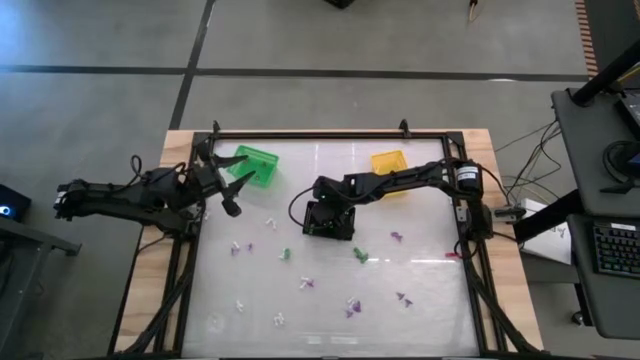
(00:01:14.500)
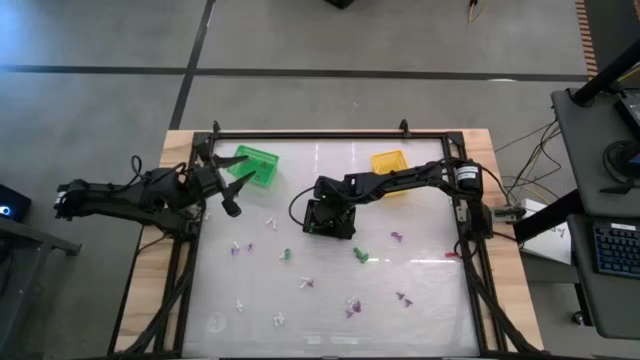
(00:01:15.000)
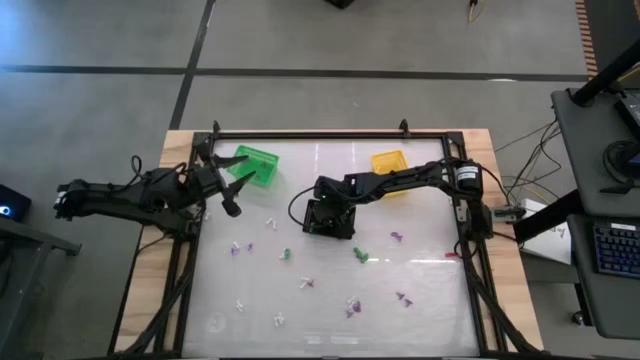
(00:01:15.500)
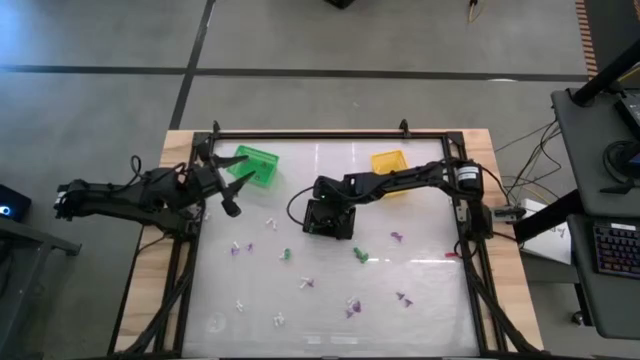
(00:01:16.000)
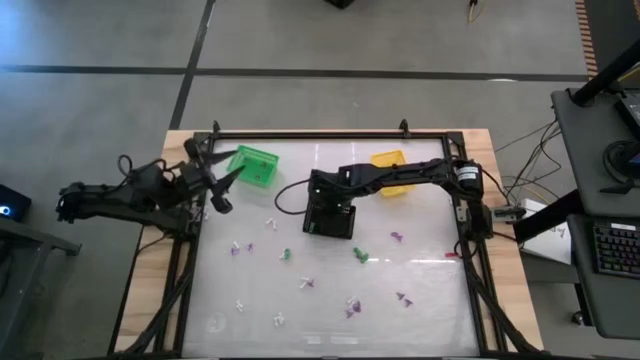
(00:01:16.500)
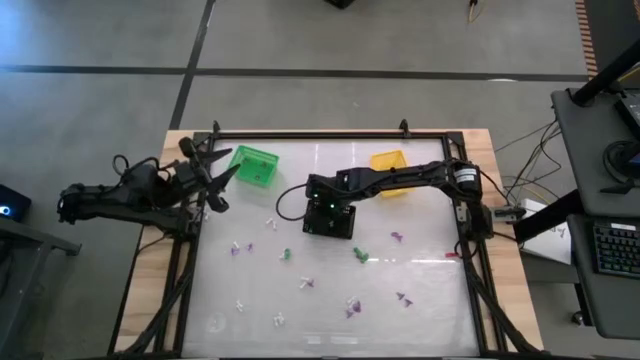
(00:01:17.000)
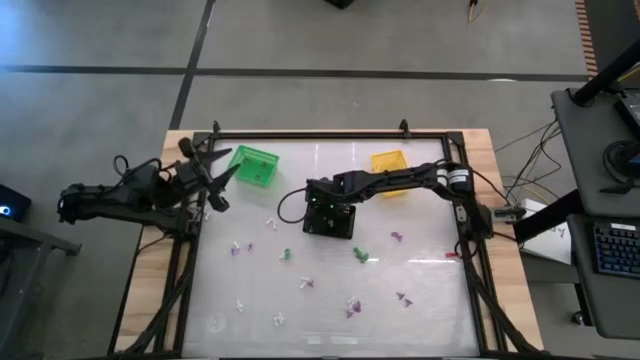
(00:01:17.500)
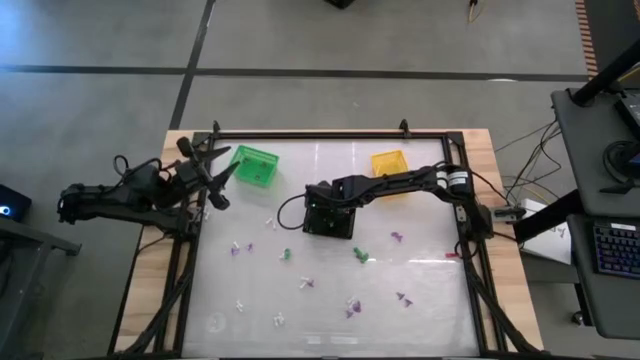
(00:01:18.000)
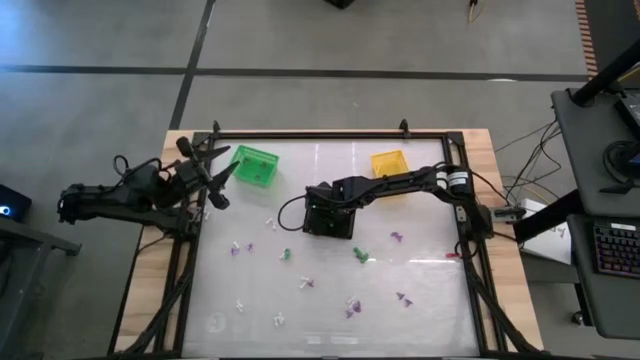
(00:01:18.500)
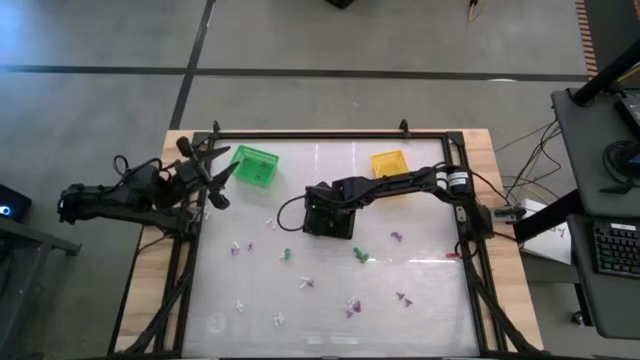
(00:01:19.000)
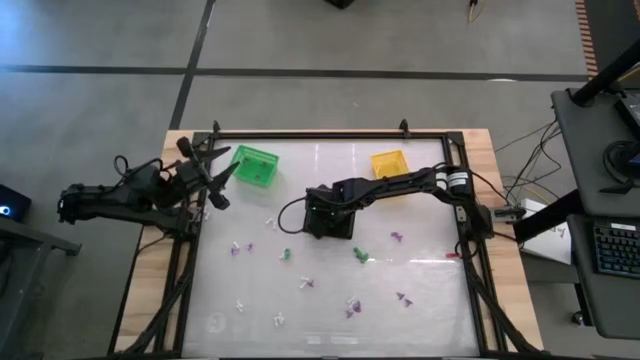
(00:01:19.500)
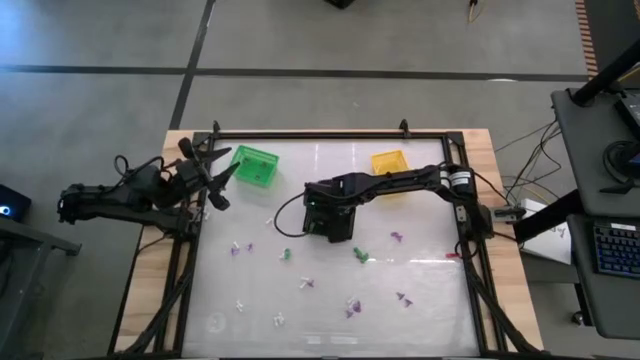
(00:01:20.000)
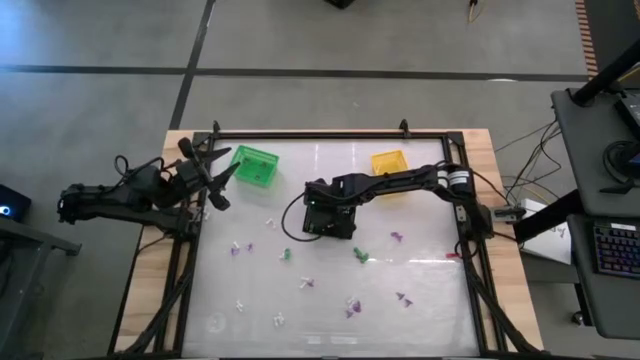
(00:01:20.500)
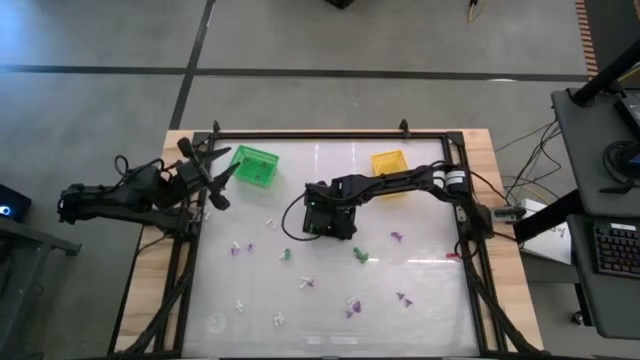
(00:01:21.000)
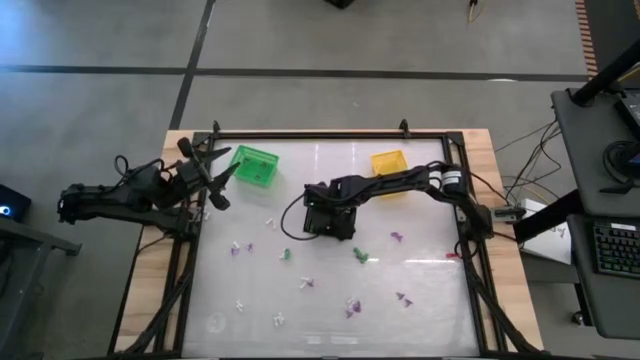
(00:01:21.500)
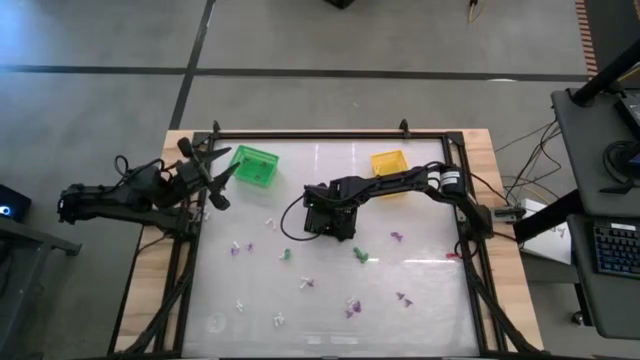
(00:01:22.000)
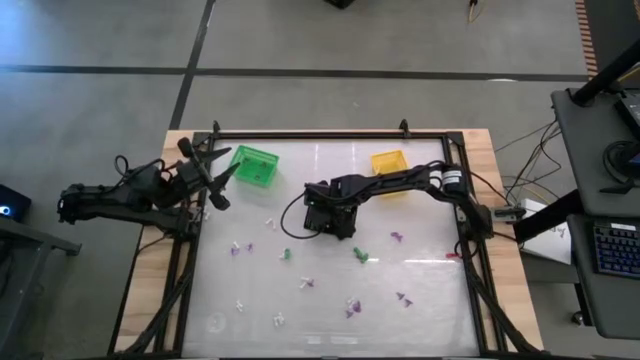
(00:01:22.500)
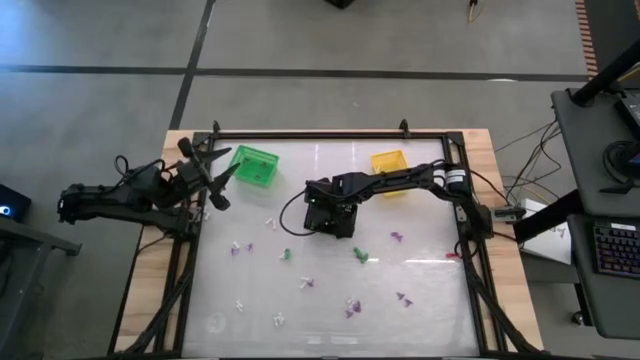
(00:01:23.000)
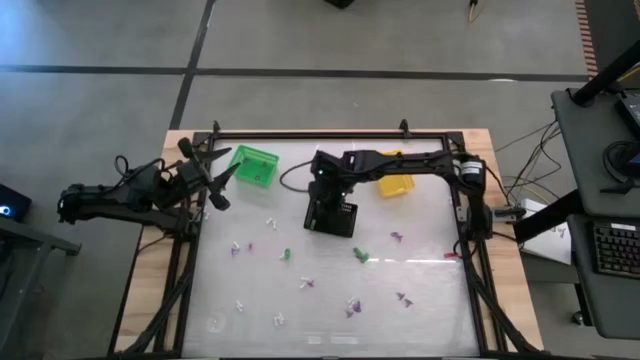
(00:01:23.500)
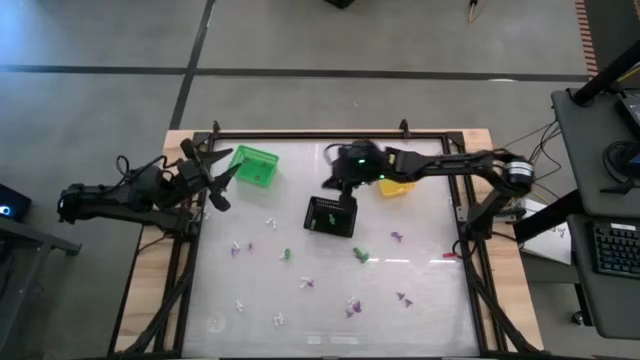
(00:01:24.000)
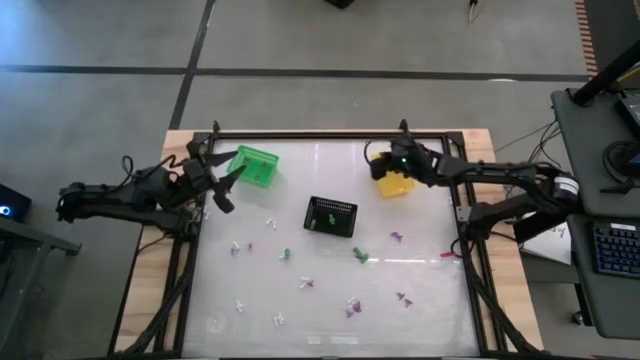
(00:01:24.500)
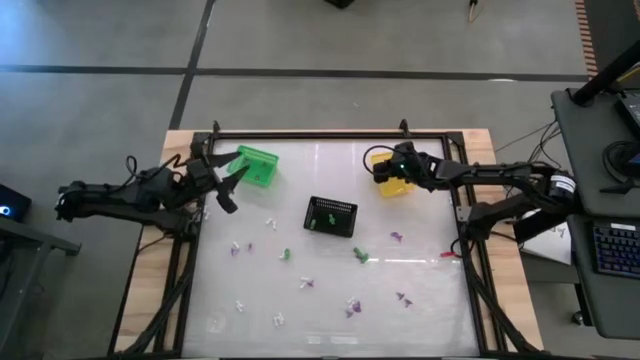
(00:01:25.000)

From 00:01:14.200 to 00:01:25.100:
Task: Sort Halloween decoration
Put the white bone toy from the black bin into the yellow bin

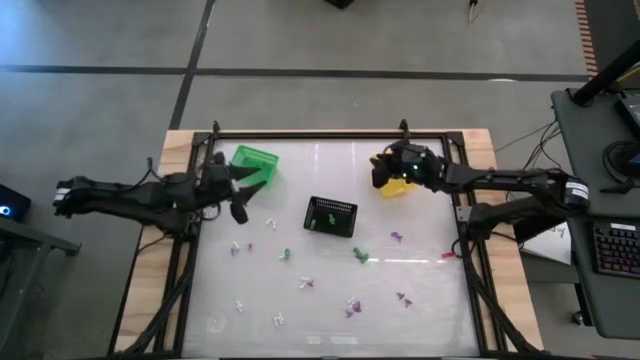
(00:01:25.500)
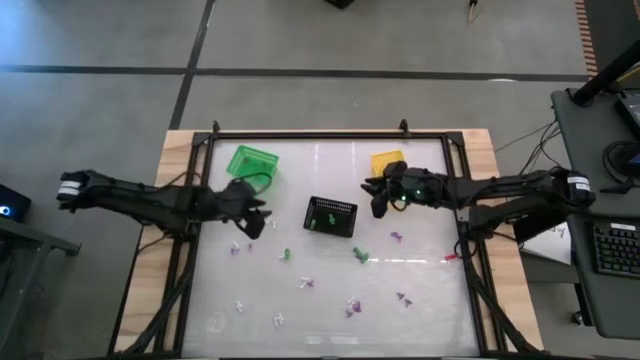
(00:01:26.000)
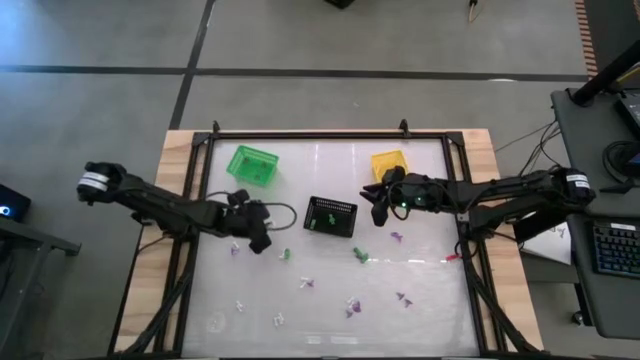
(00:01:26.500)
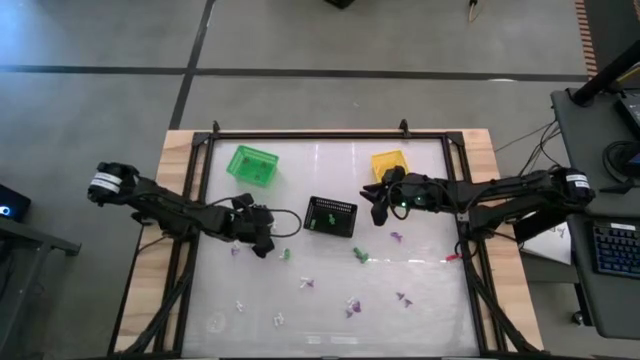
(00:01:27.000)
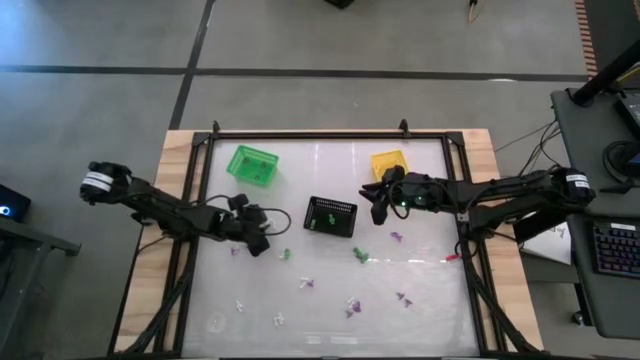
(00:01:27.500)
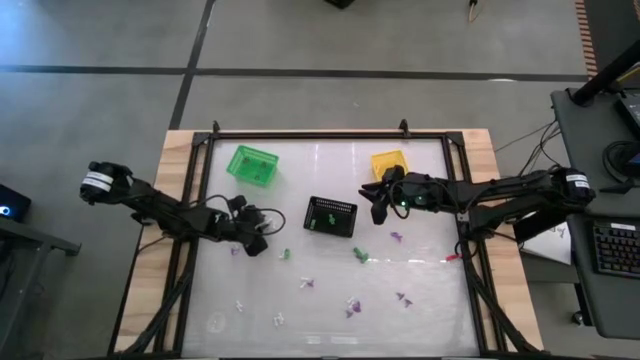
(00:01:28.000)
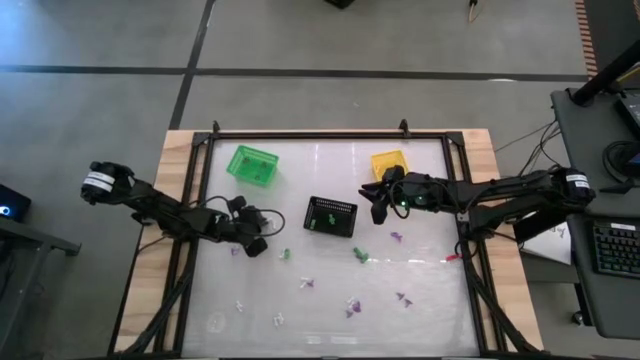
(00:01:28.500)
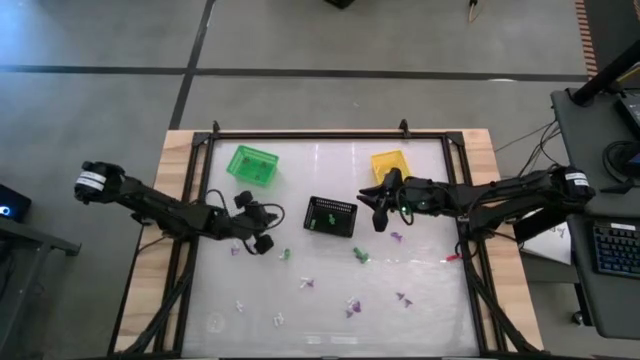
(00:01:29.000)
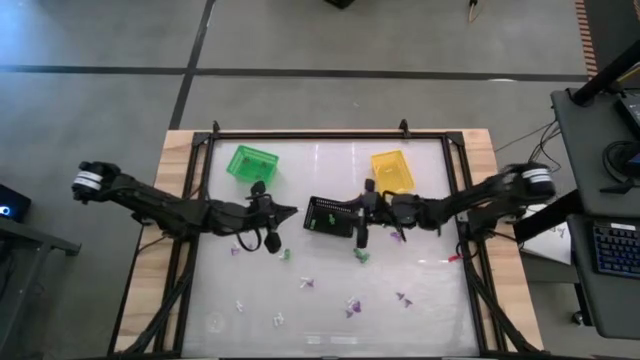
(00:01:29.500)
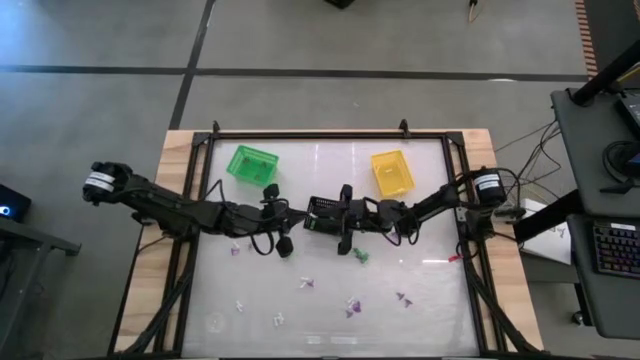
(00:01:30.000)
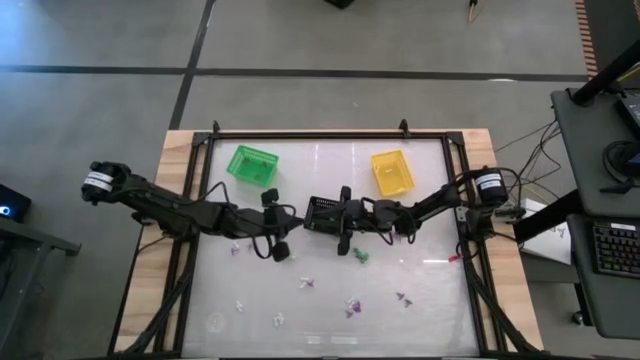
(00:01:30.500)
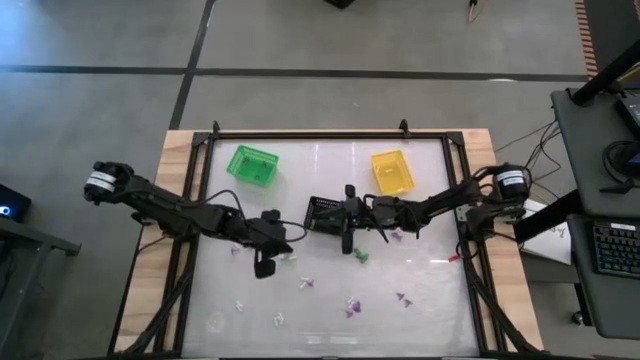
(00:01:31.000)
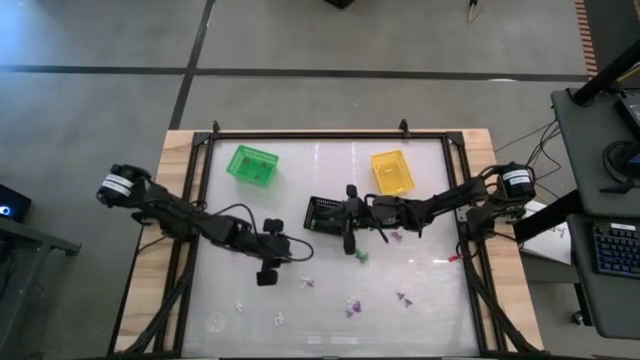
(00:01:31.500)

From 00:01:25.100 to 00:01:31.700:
Put the white bone toy into the yellow bin

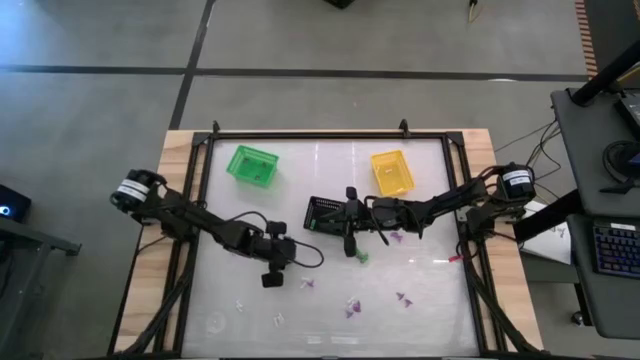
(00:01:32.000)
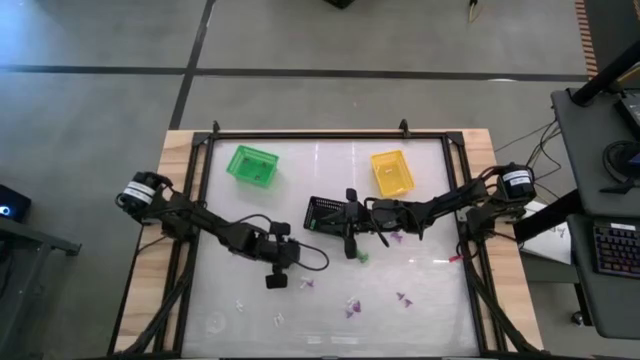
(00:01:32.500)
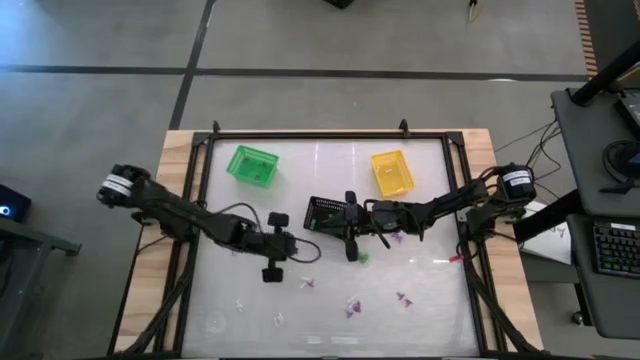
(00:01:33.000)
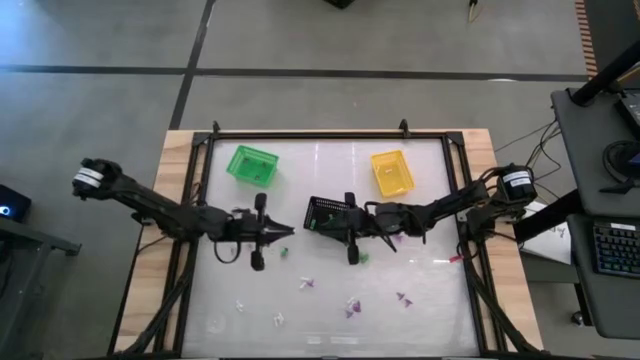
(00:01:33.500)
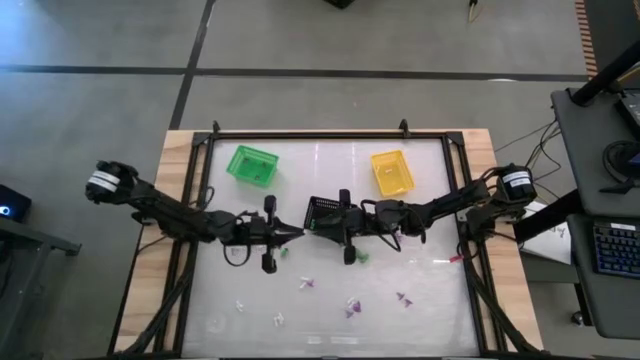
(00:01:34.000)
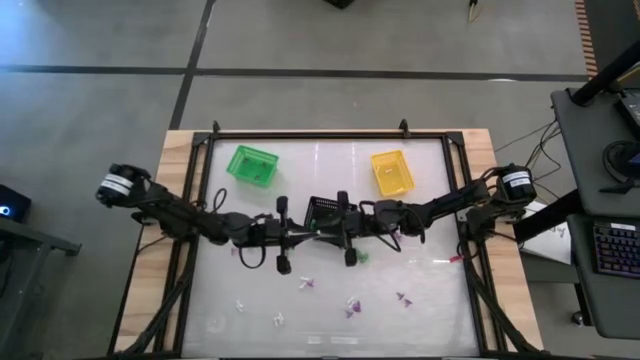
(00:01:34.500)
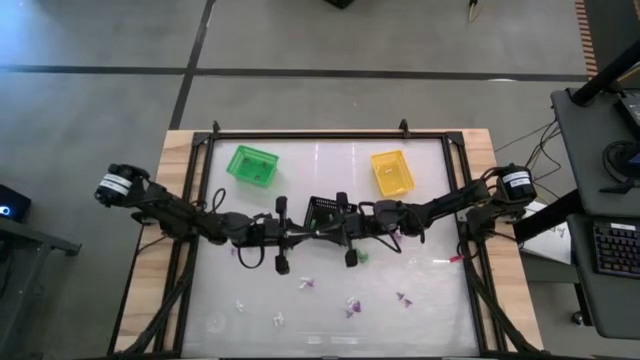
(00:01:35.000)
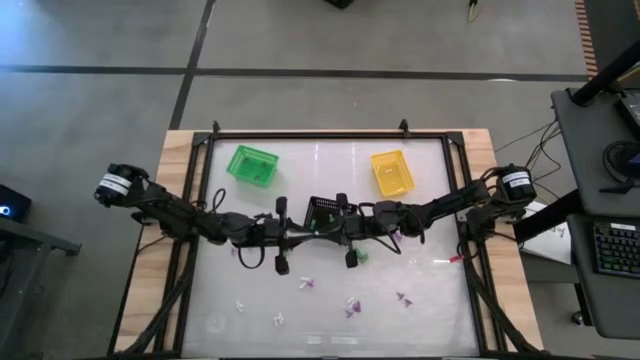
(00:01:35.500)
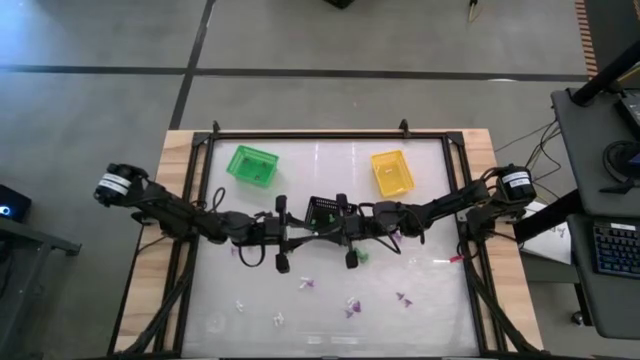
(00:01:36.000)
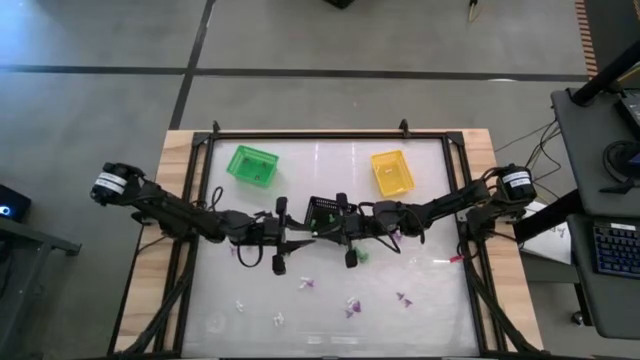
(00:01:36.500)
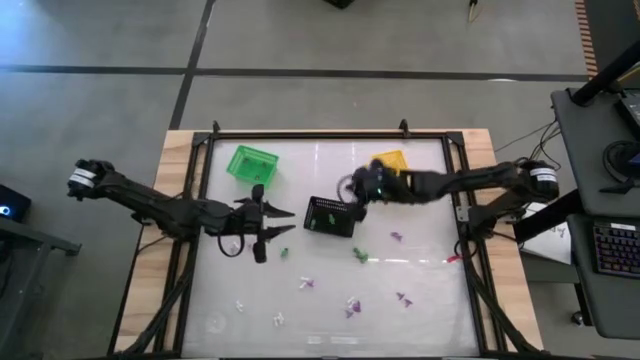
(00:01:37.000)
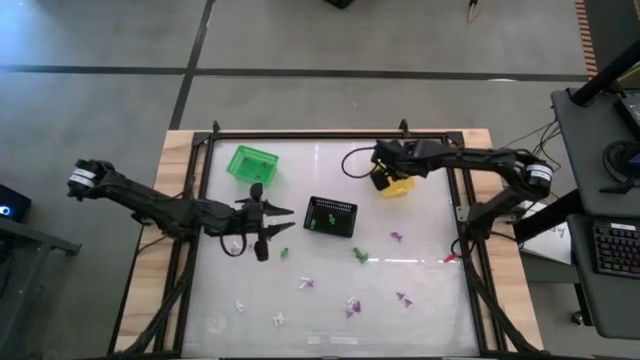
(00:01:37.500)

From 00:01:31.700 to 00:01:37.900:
Put the white bone toy into the yellow bin
